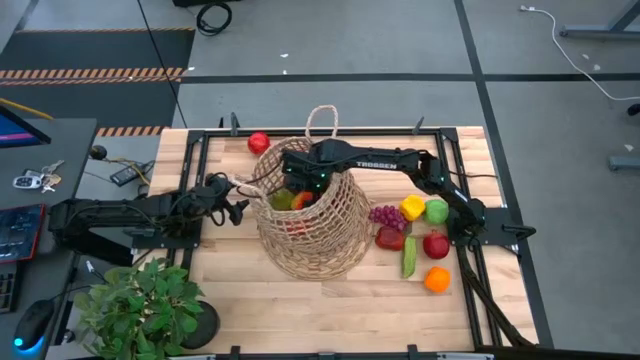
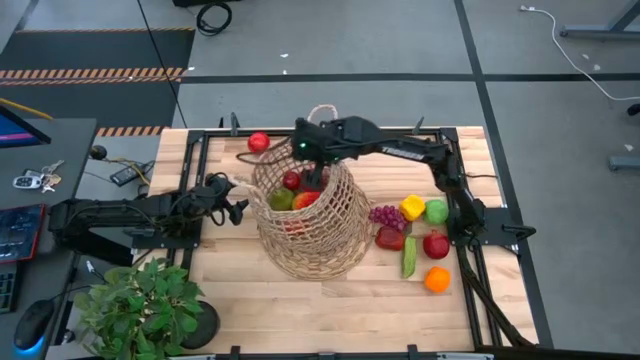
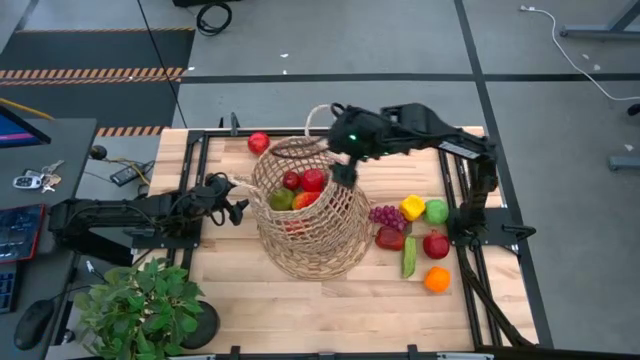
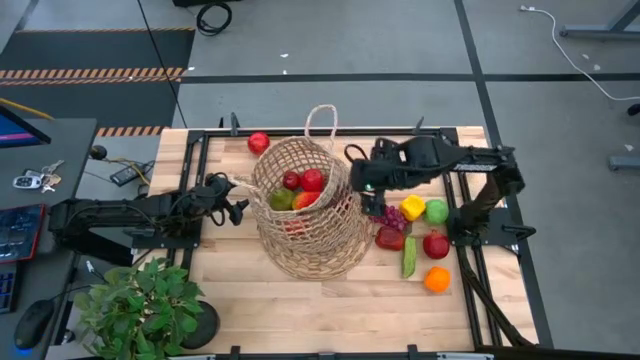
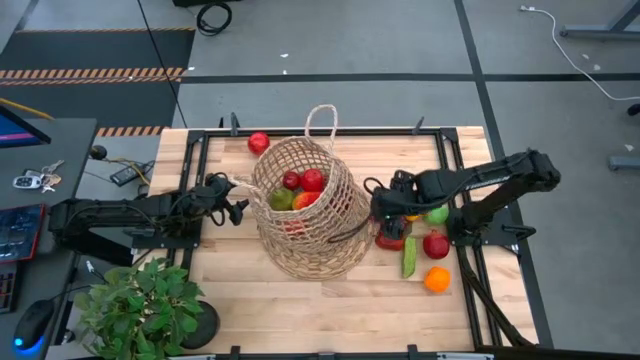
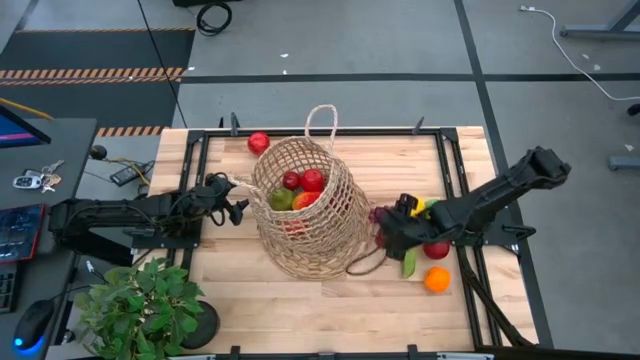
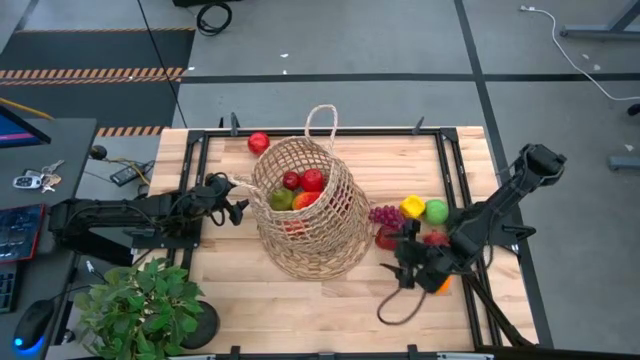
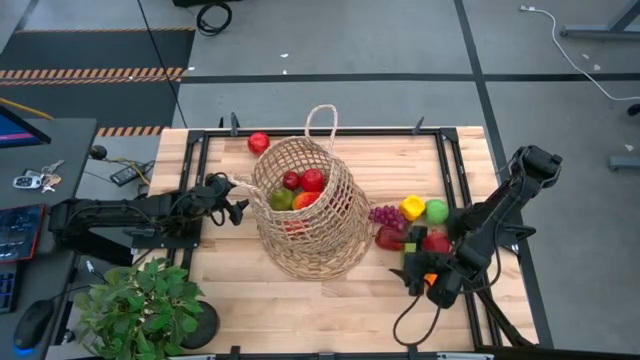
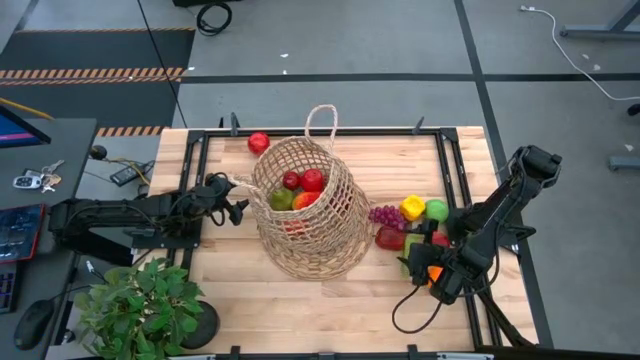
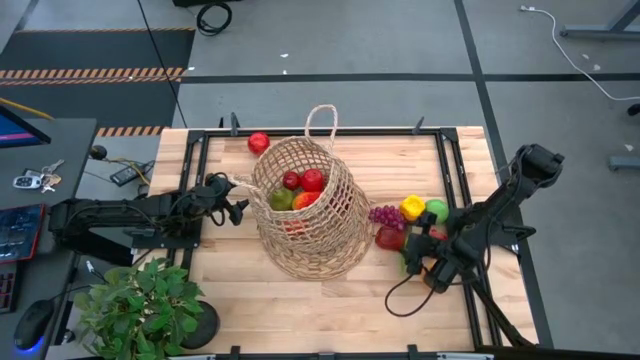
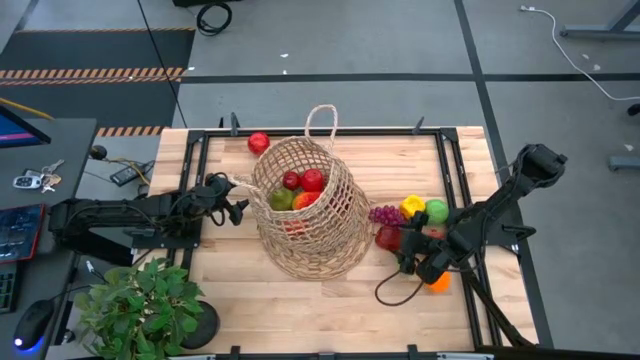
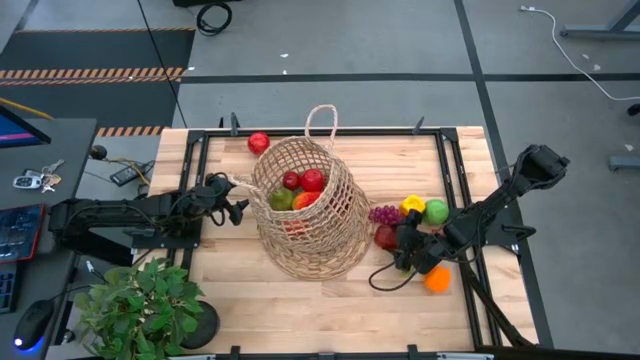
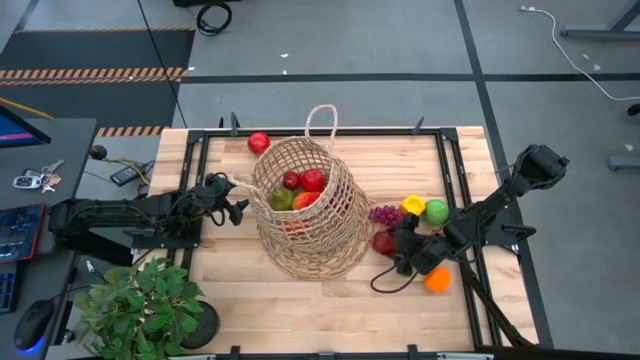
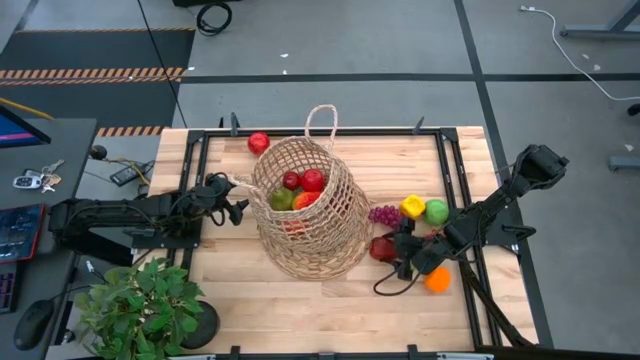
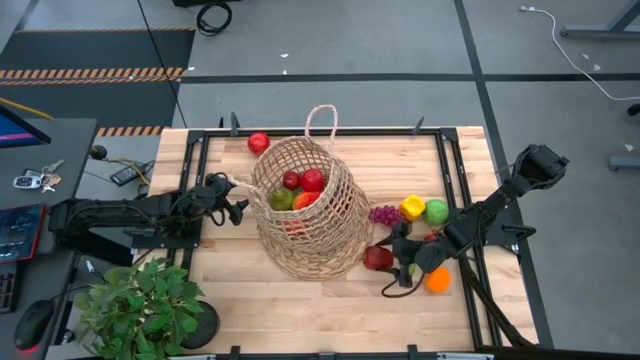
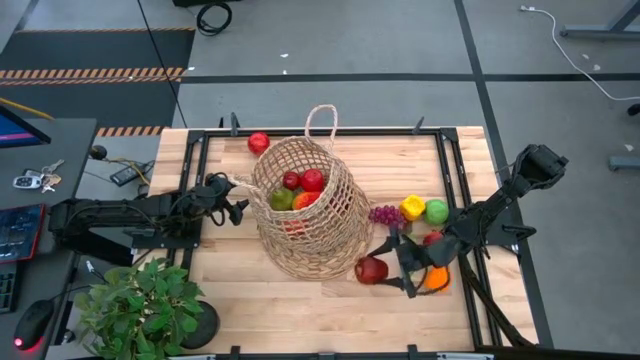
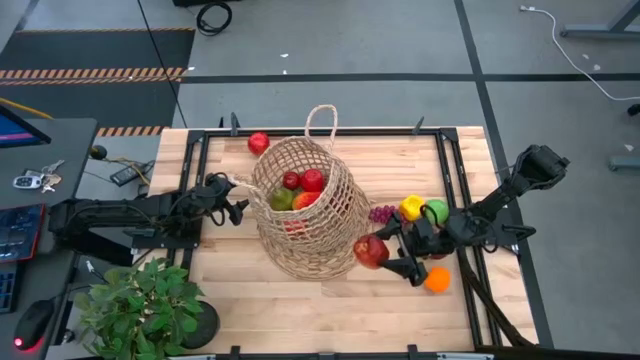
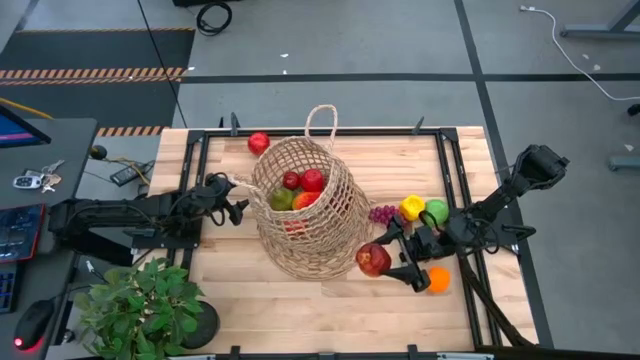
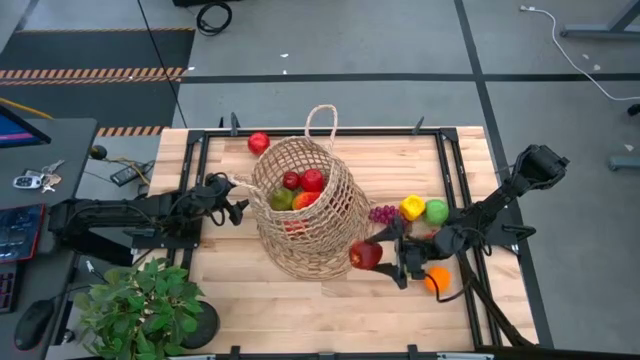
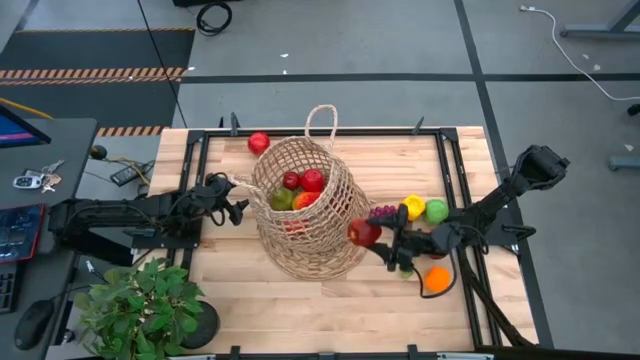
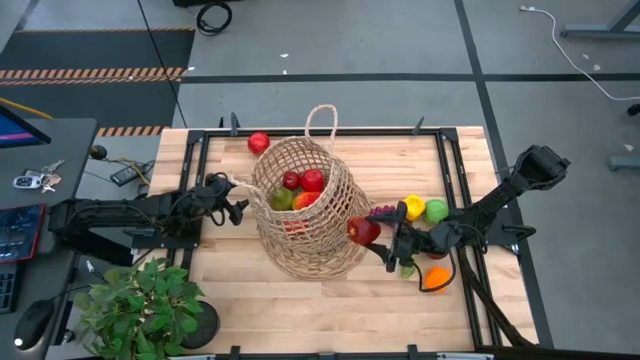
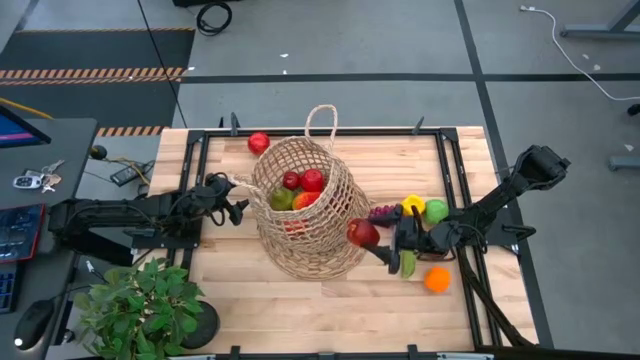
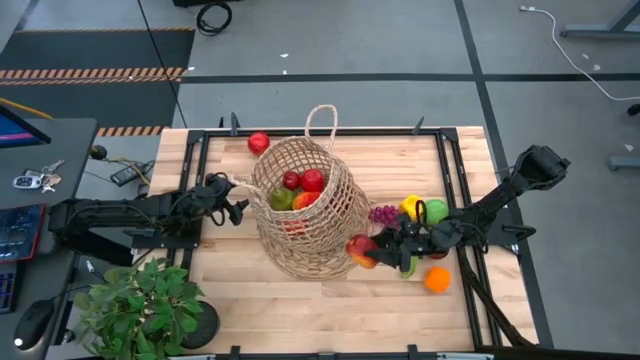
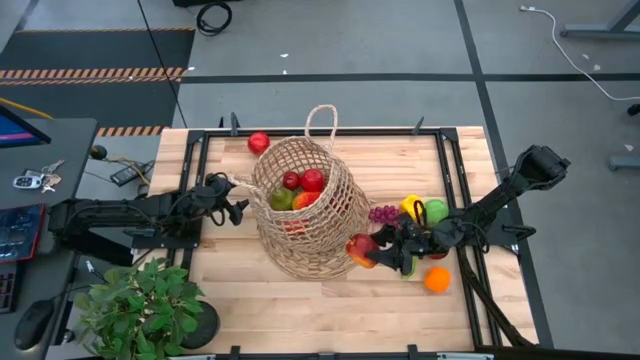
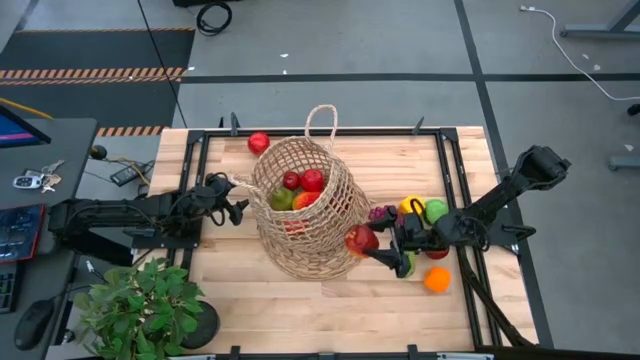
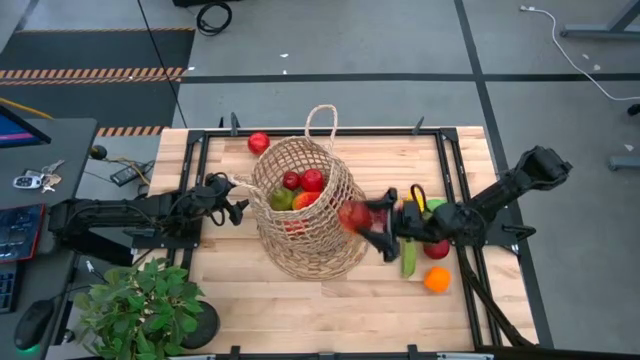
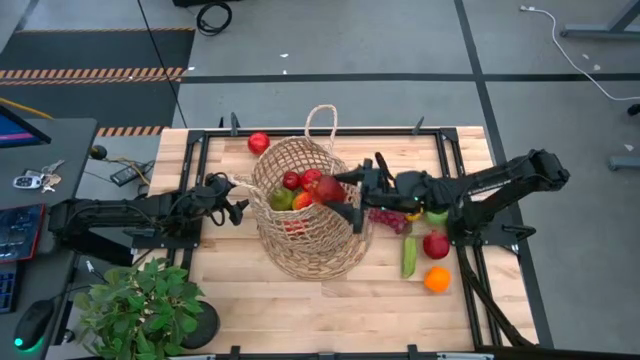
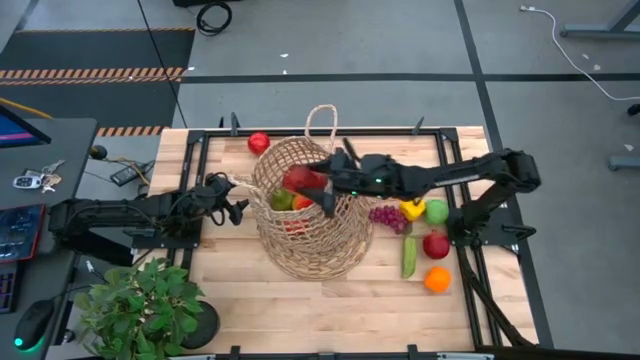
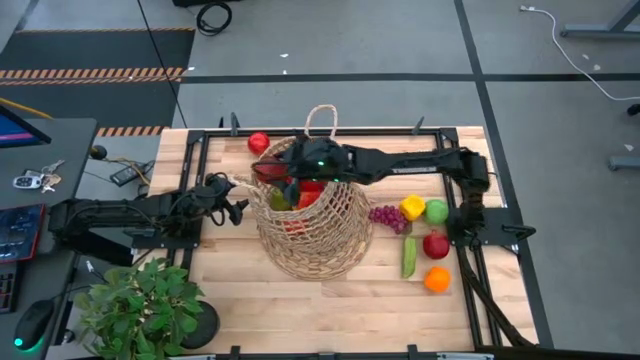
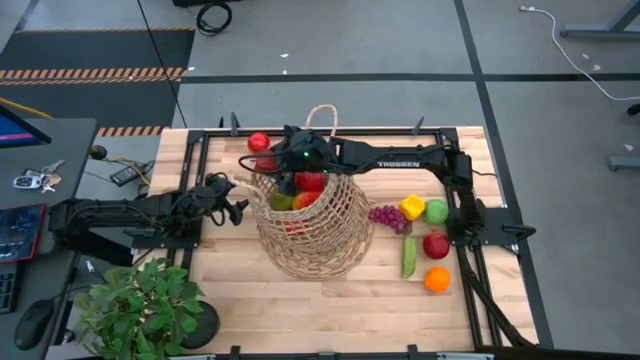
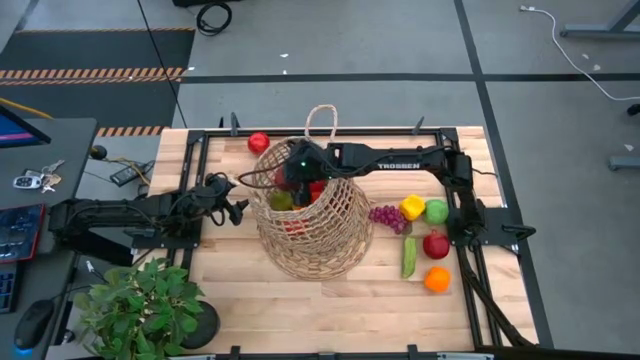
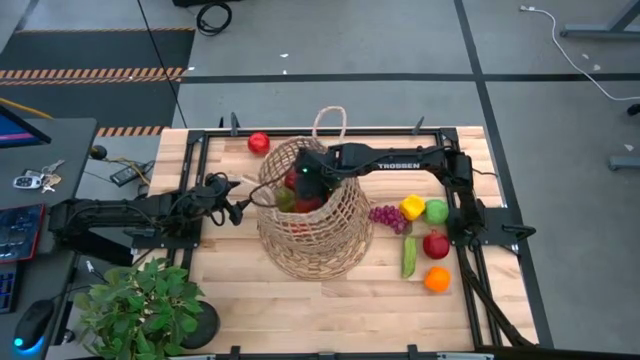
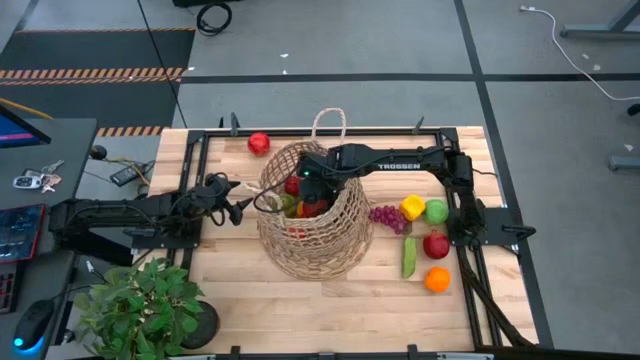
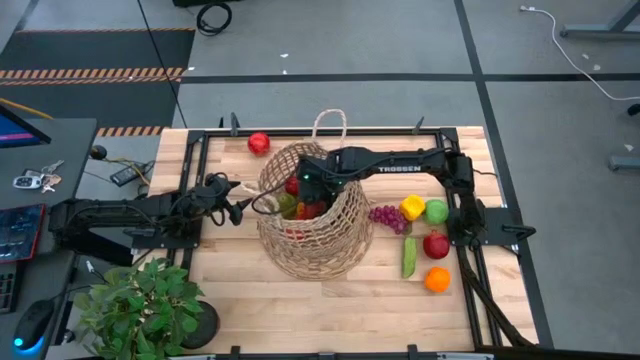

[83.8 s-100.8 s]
Task: Build produce basket
Put the dark red apple into the basket

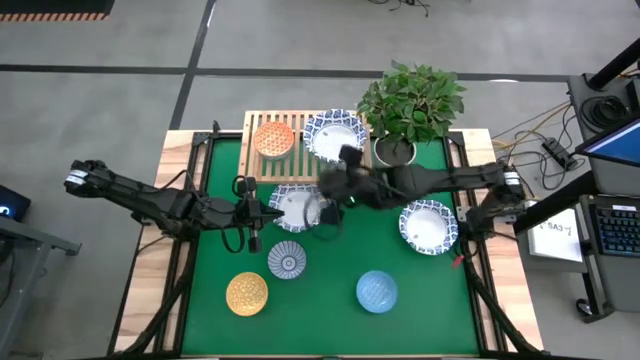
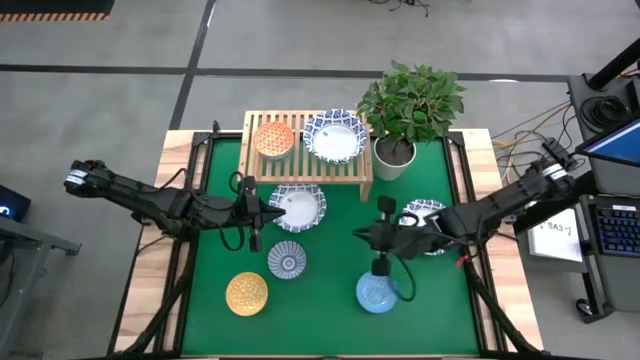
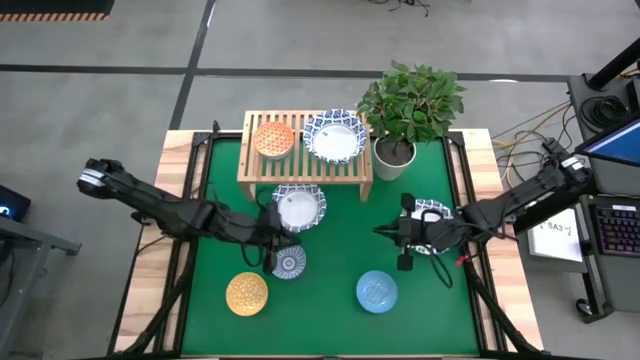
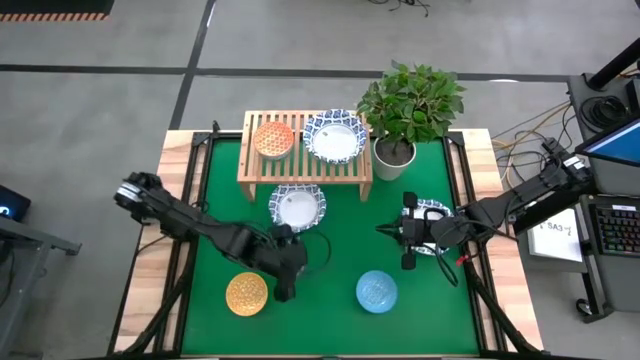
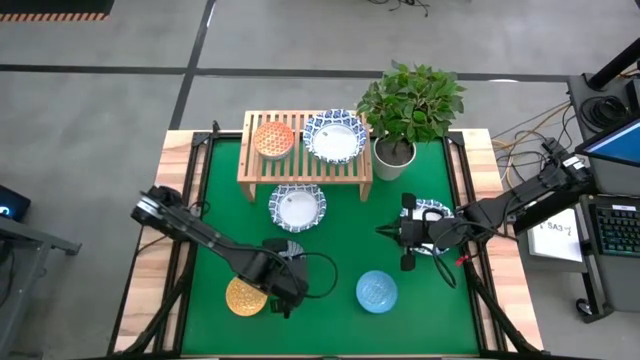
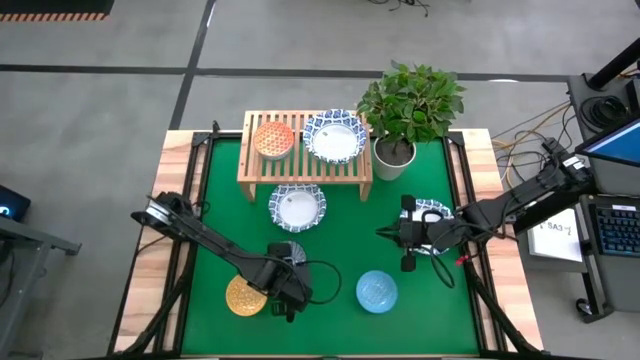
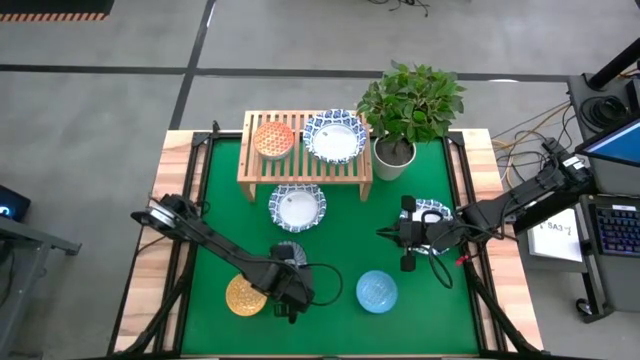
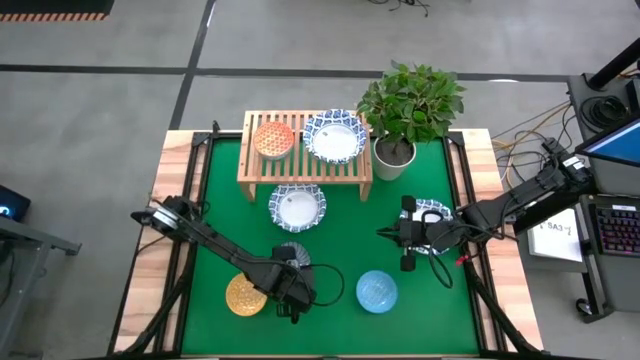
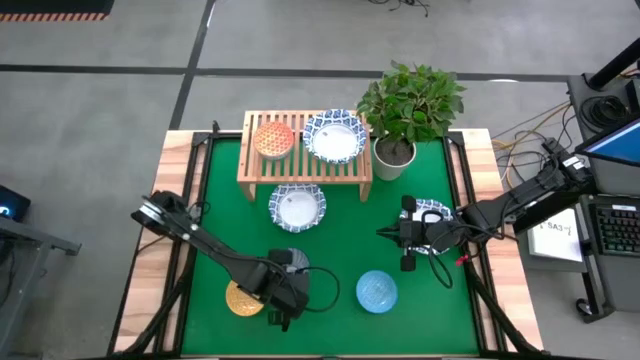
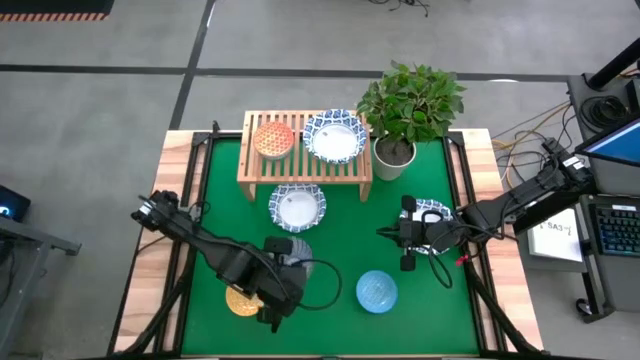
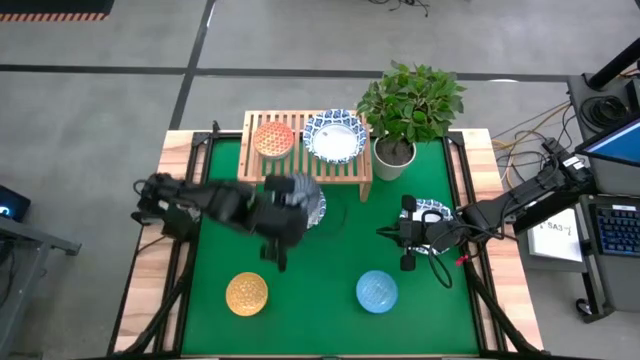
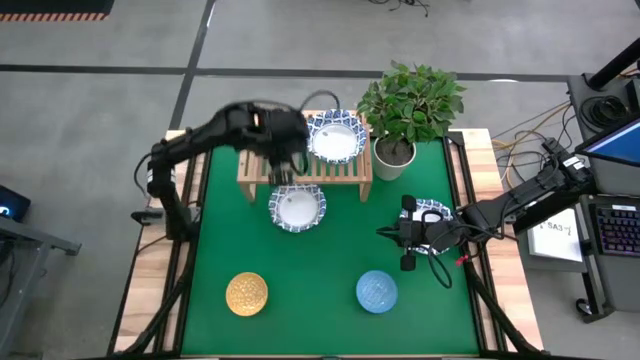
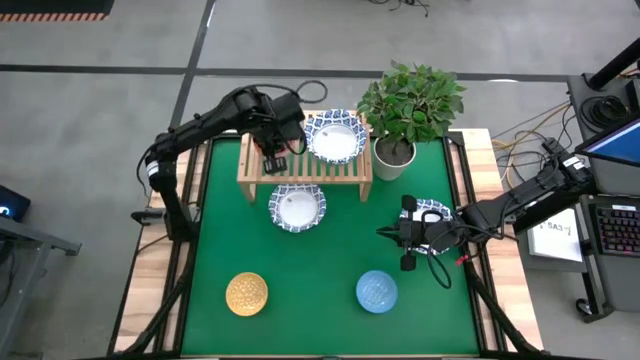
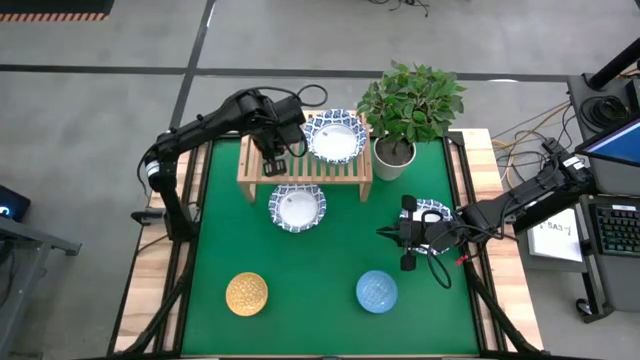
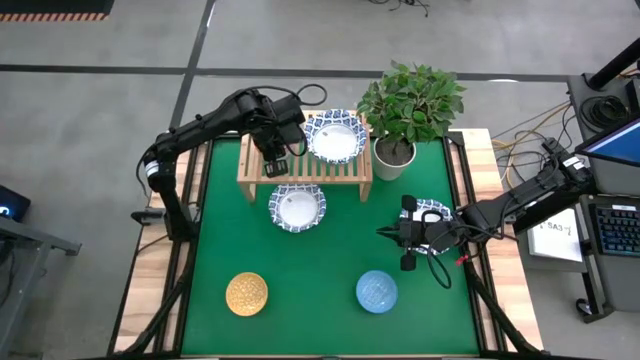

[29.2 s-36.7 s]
Task: Place and stack plates onto a shelf
Stack the blue and white bowl on top of the orange bowl on the shelf
